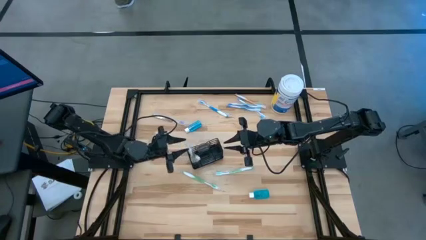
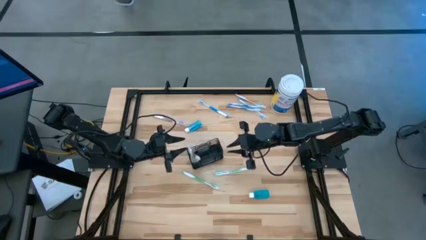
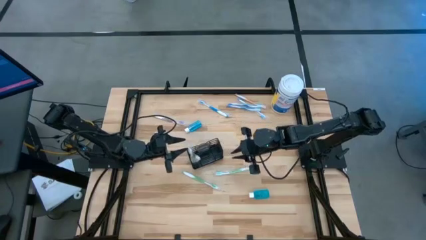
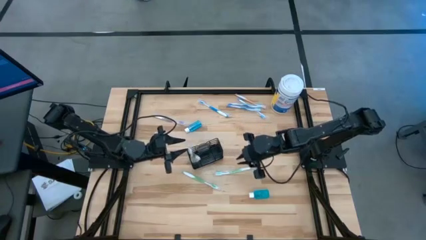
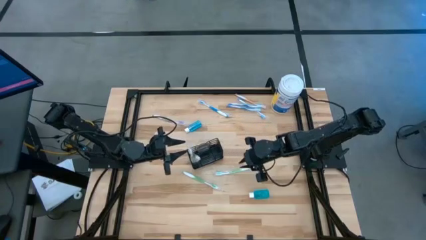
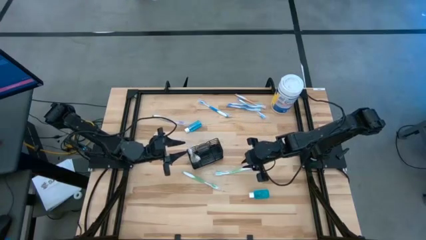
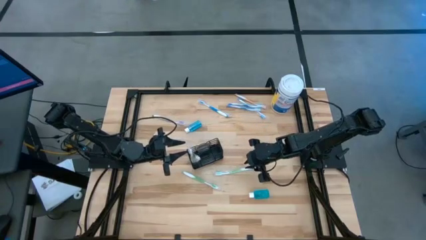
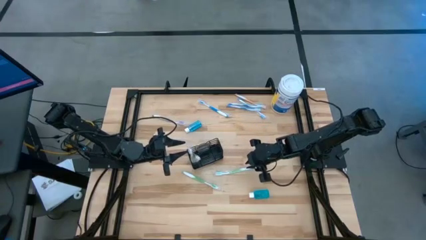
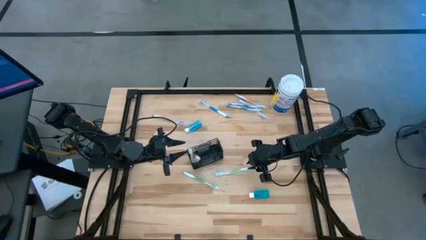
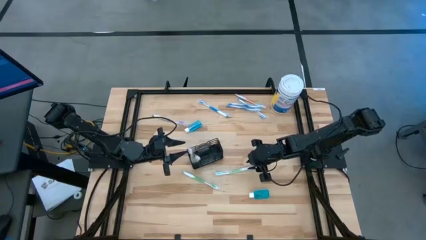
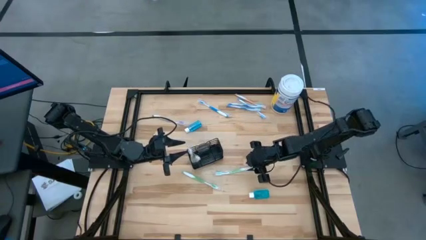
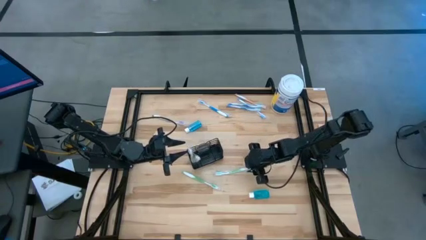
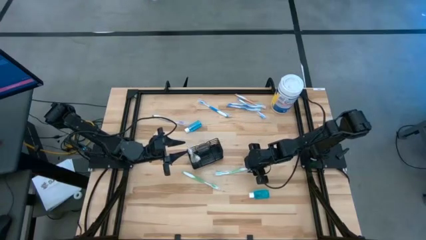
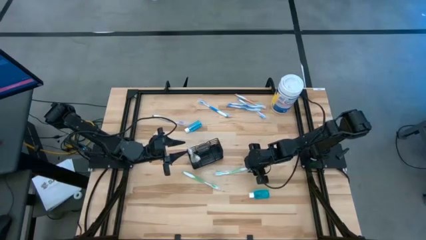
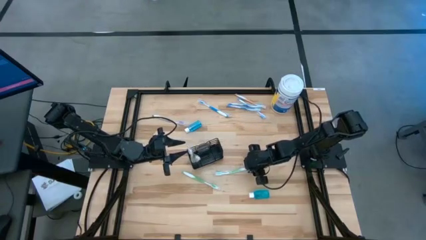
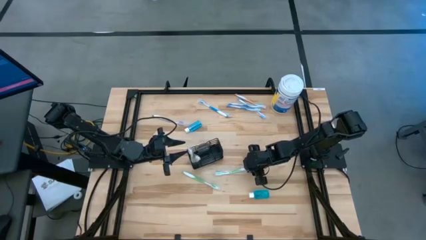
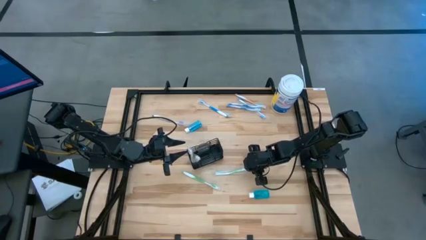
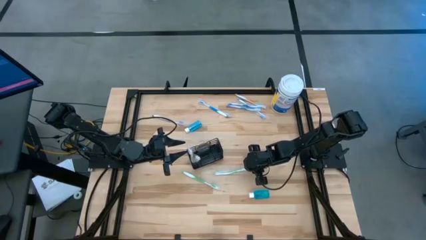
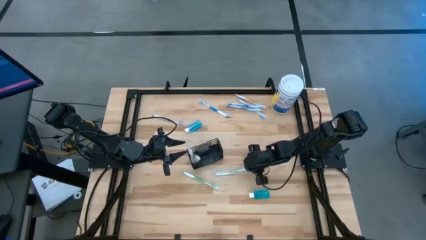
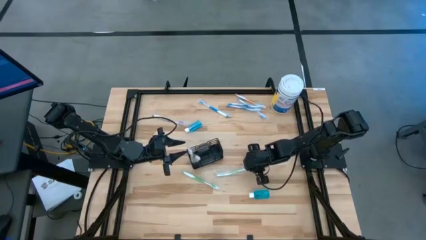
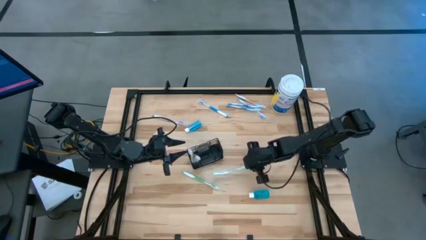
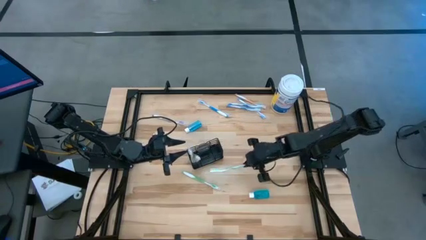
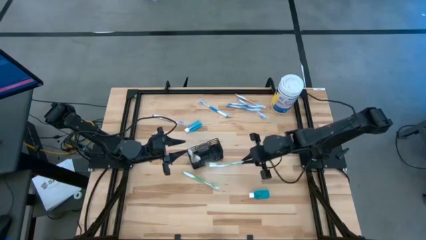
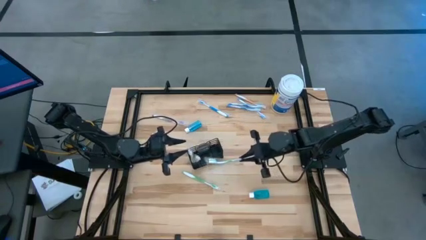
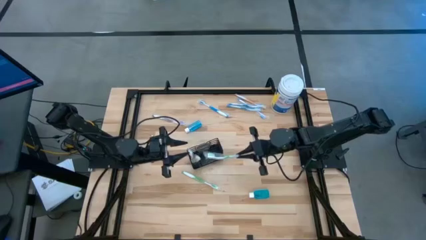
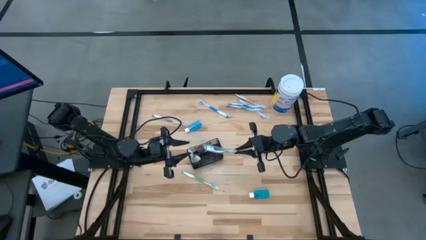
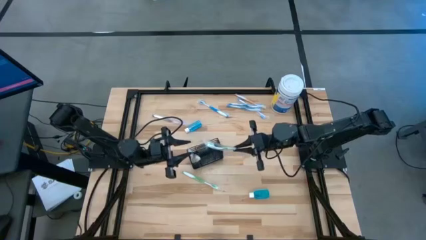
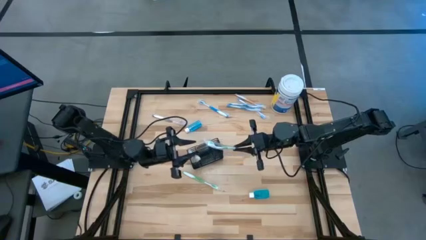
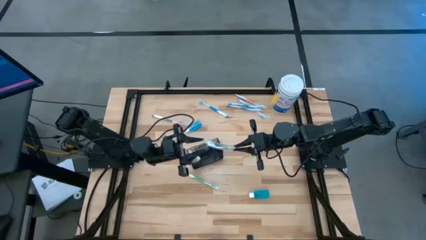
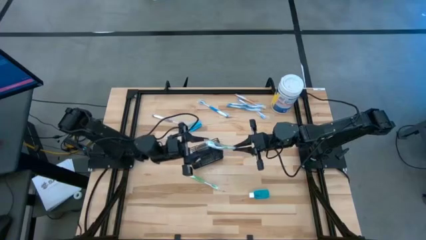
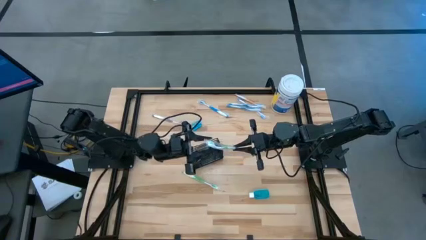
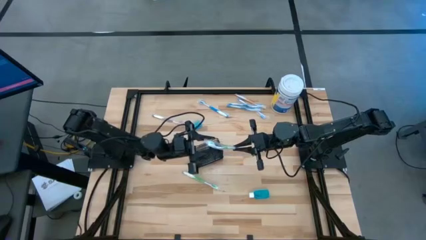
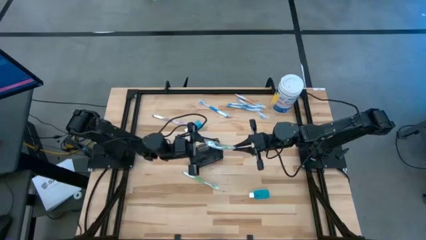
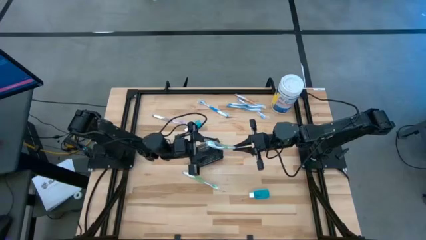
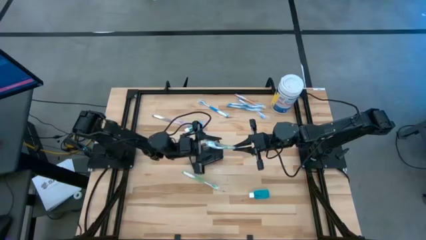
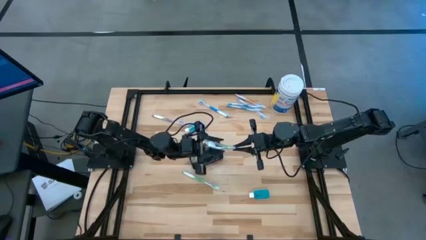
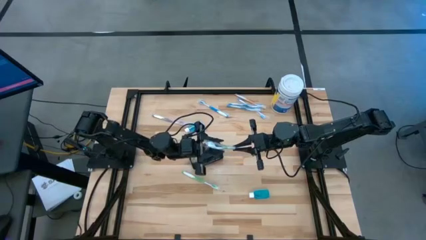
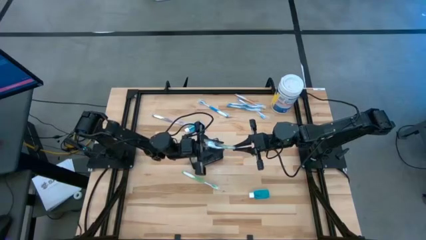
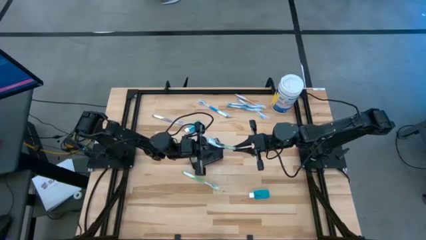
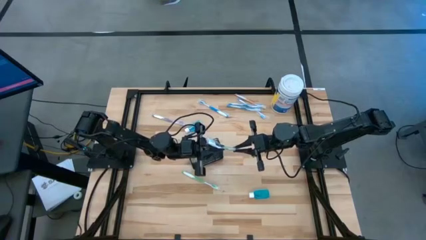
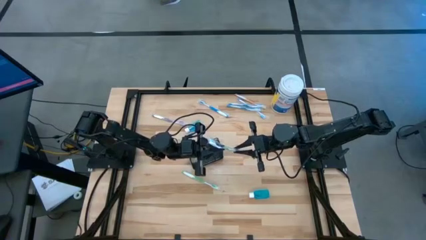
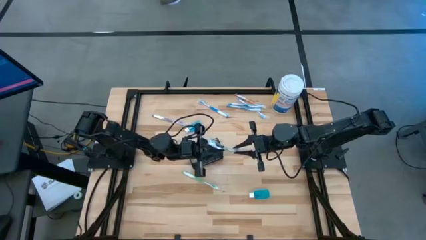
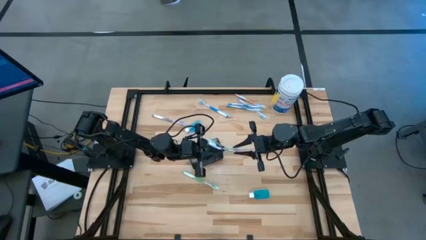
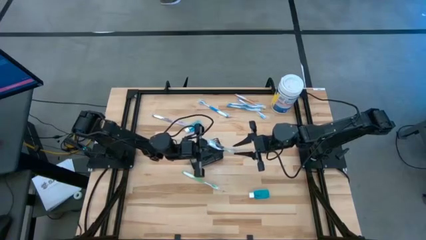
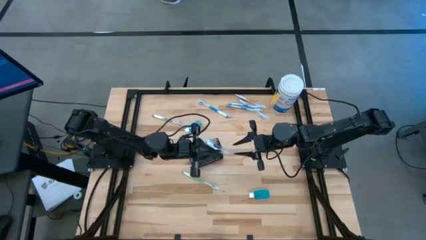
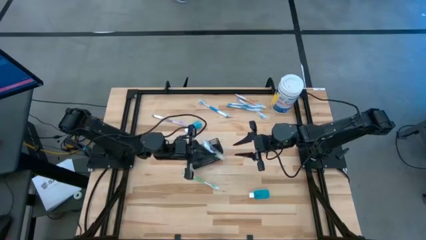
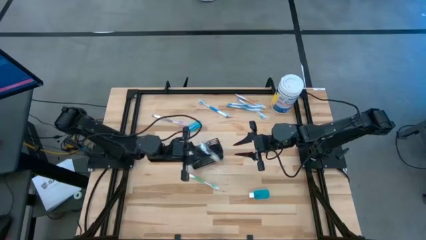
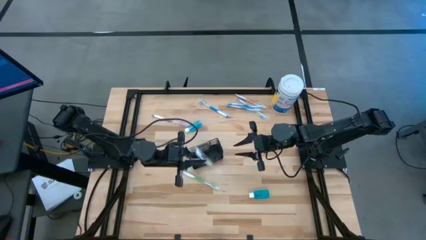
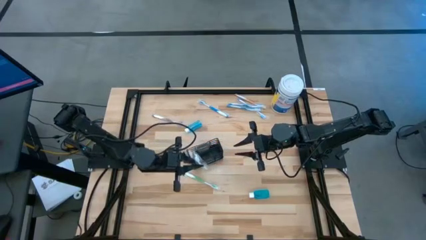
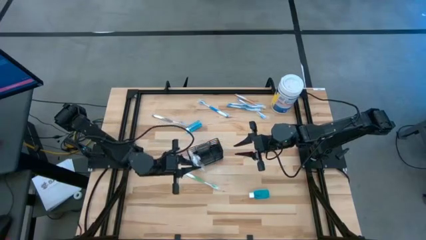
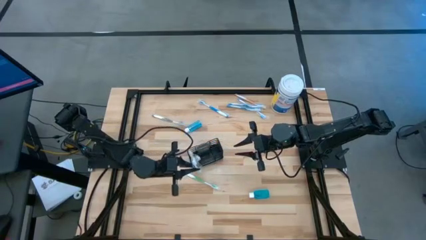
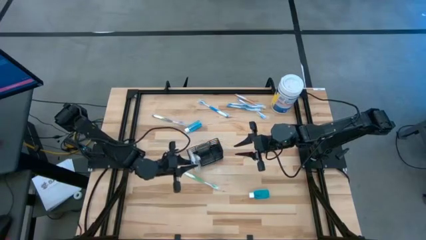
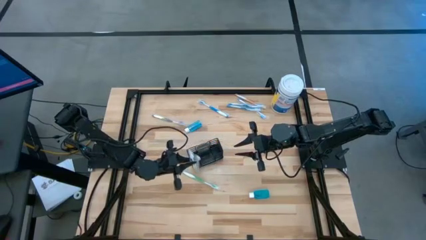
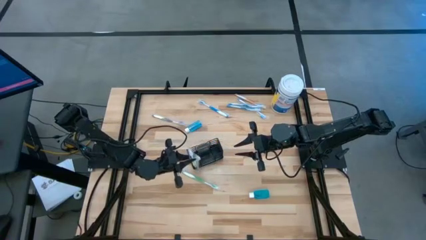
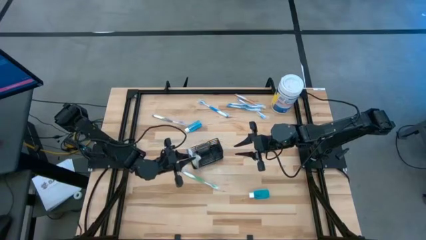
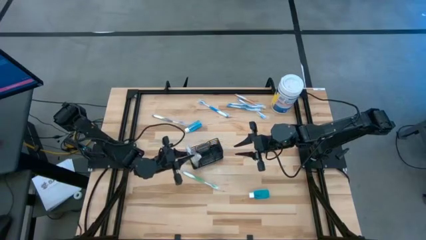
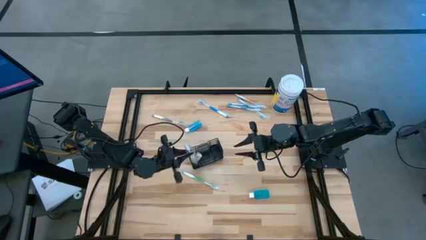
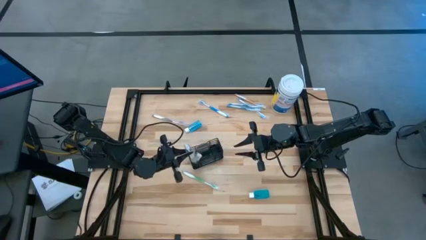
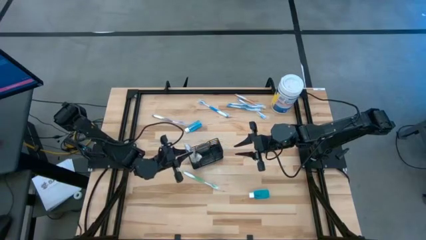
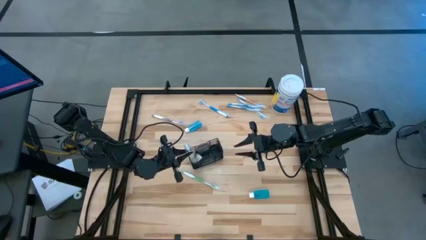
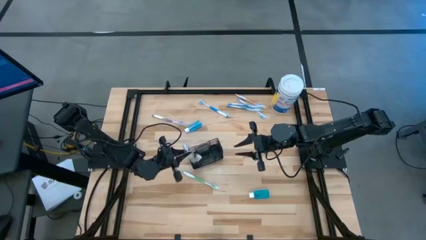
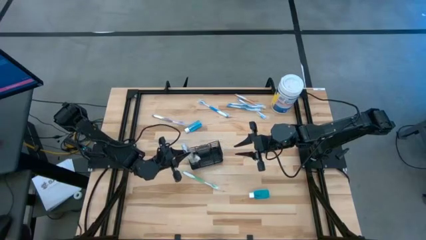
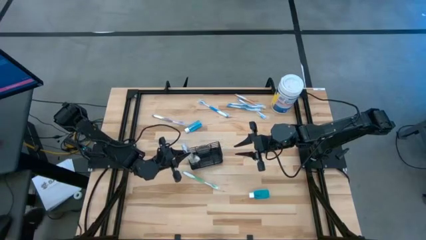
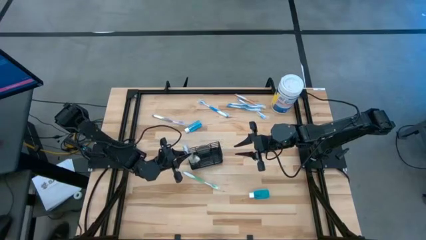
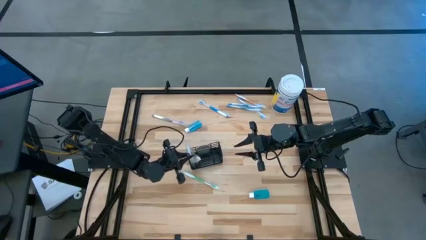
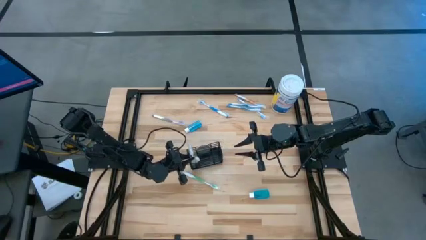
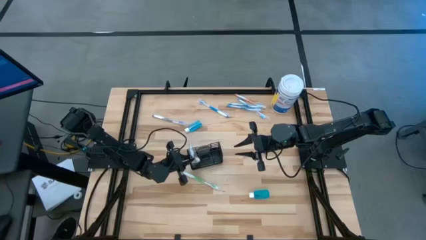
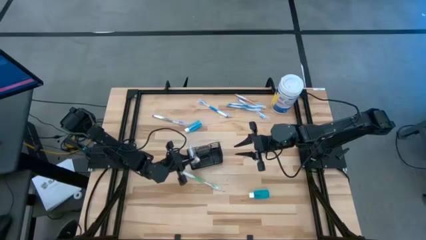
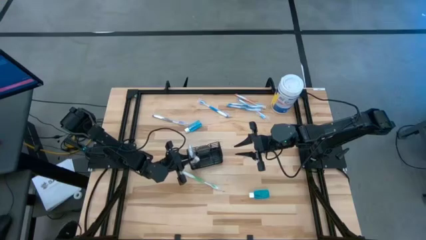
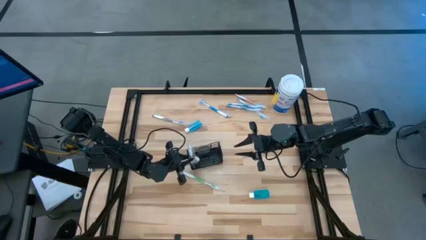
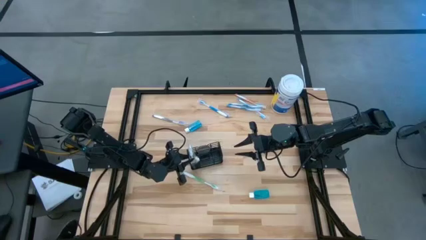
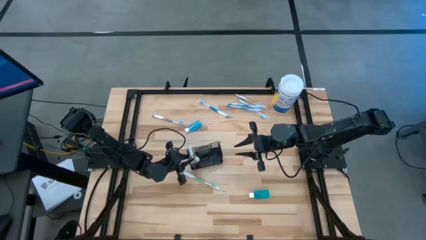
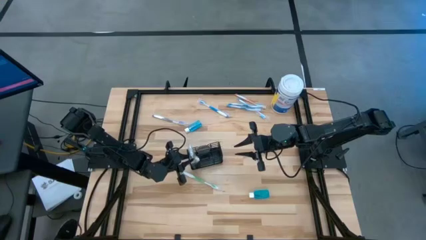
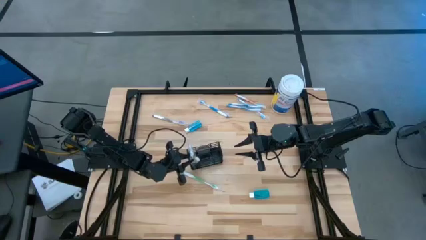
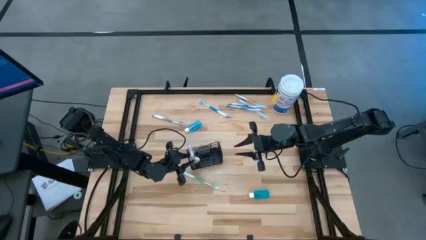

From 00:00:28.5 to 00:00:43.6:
Task: Pick & Place toothbrushing station
Put the green toothbrush into the wire organizer
